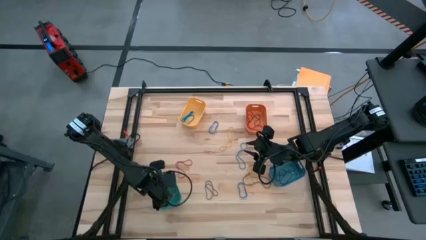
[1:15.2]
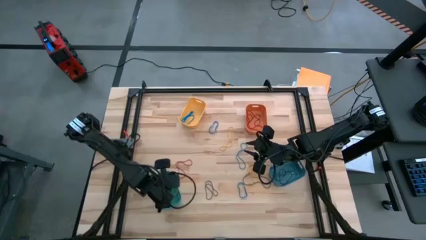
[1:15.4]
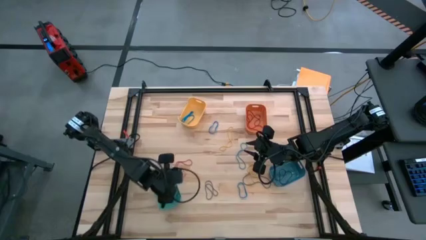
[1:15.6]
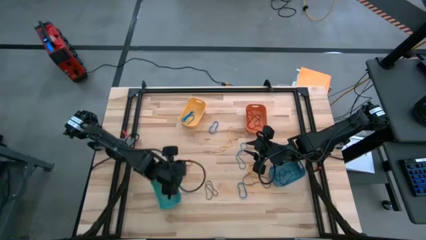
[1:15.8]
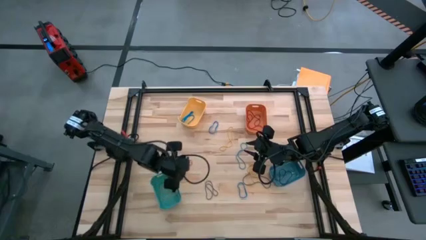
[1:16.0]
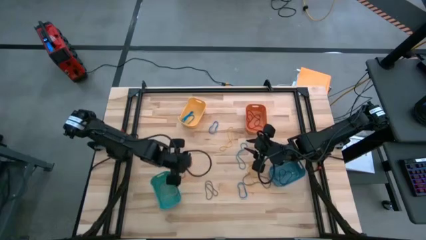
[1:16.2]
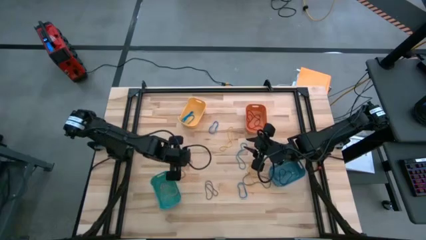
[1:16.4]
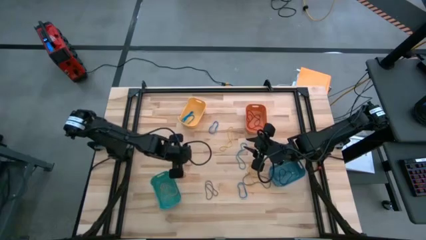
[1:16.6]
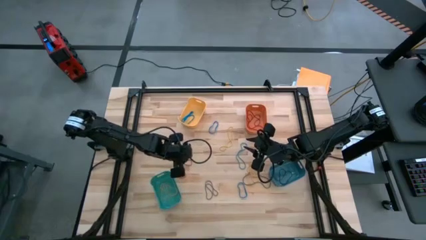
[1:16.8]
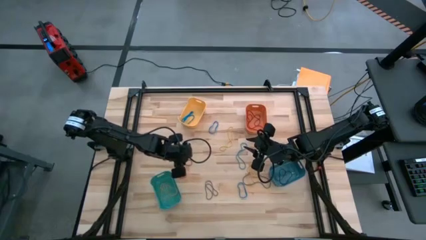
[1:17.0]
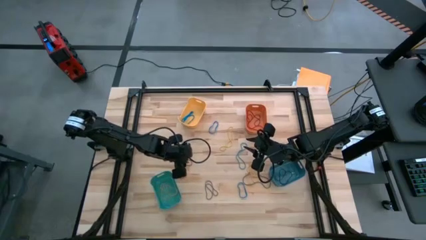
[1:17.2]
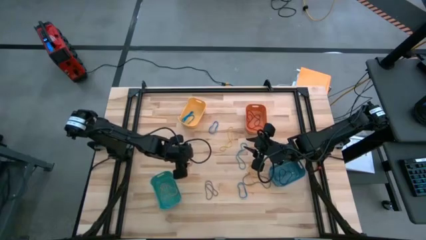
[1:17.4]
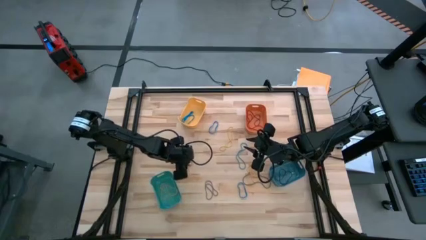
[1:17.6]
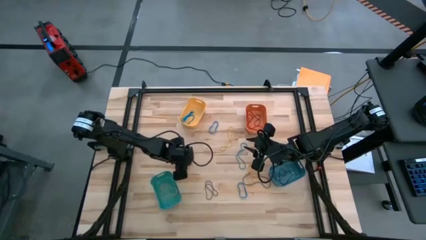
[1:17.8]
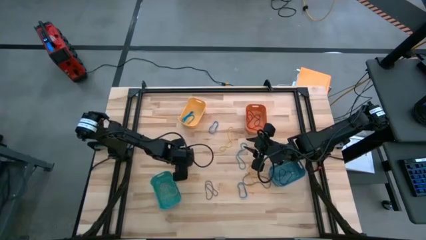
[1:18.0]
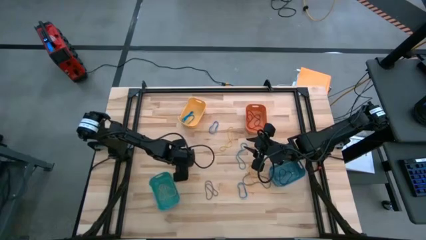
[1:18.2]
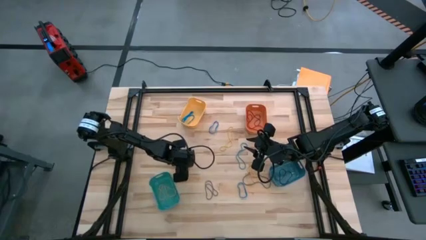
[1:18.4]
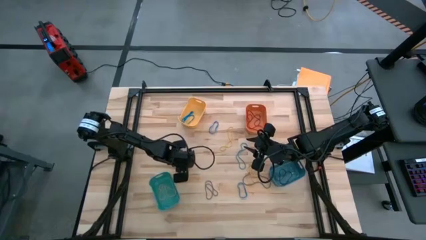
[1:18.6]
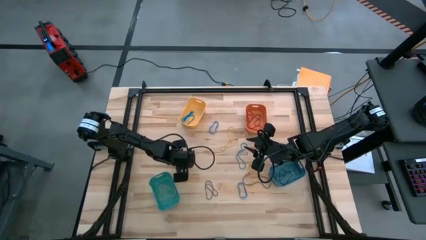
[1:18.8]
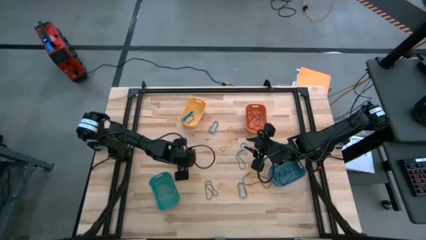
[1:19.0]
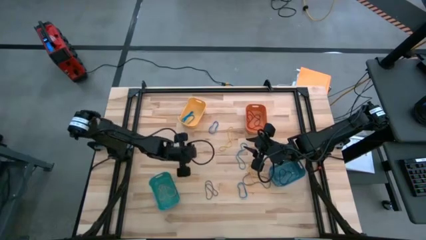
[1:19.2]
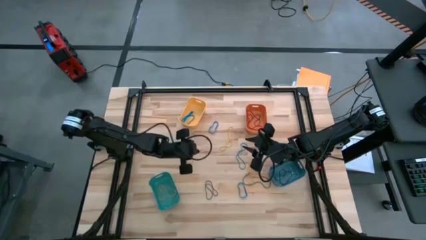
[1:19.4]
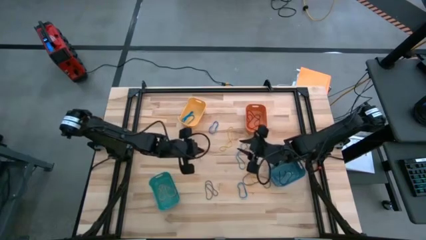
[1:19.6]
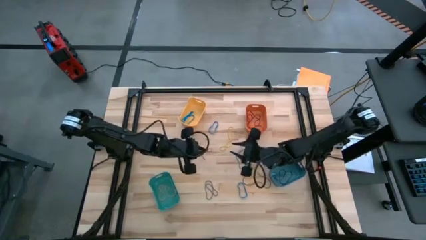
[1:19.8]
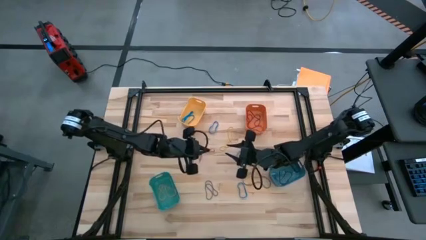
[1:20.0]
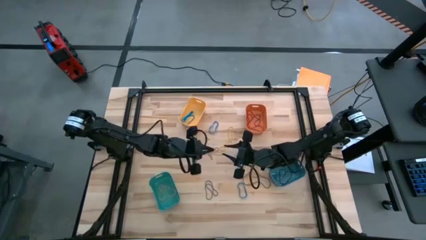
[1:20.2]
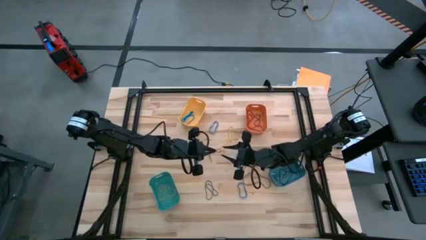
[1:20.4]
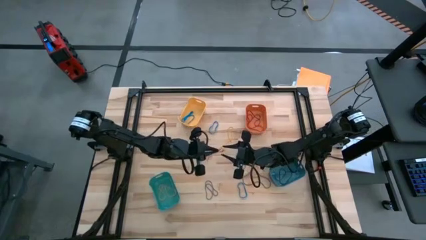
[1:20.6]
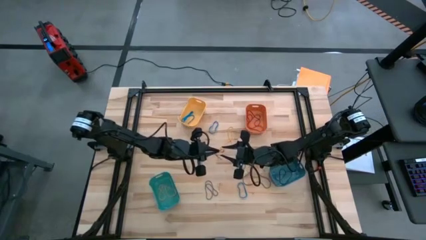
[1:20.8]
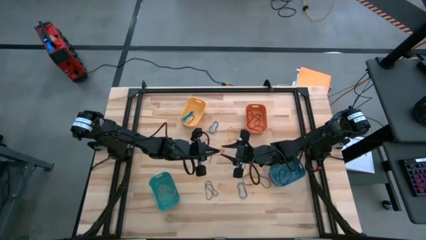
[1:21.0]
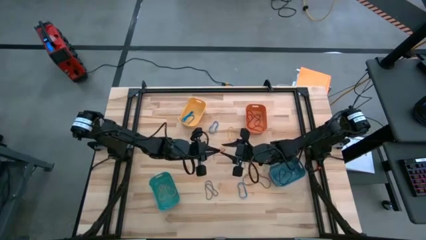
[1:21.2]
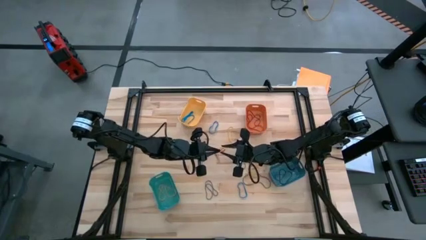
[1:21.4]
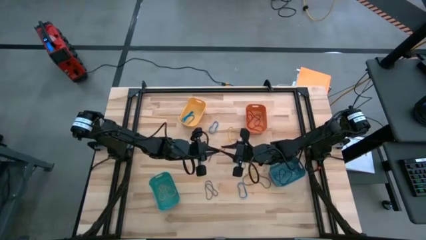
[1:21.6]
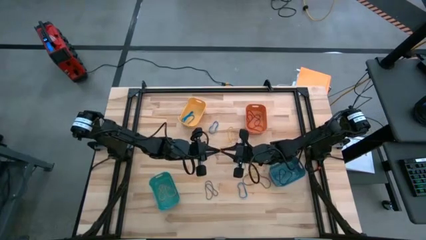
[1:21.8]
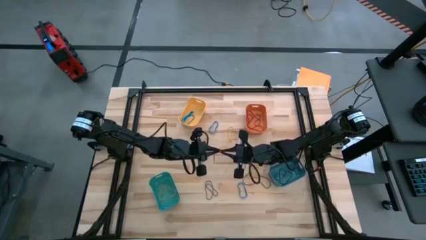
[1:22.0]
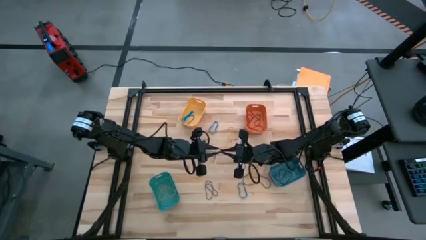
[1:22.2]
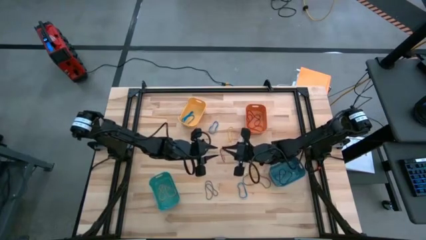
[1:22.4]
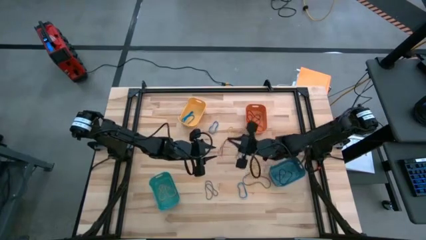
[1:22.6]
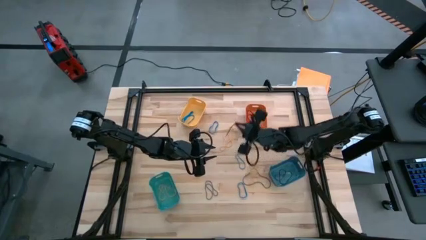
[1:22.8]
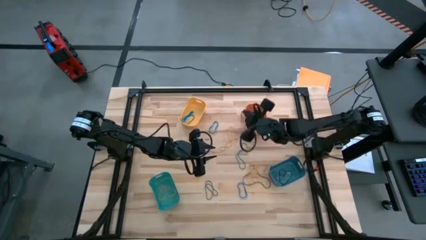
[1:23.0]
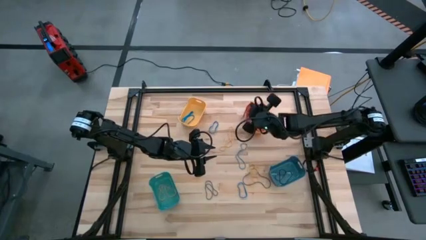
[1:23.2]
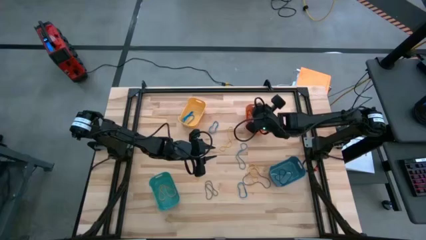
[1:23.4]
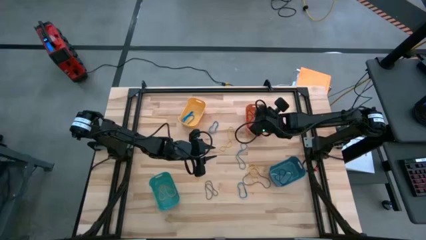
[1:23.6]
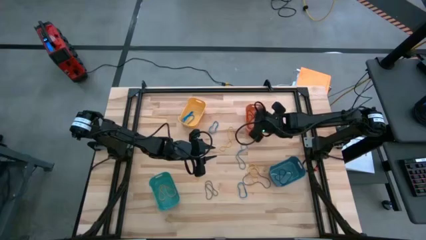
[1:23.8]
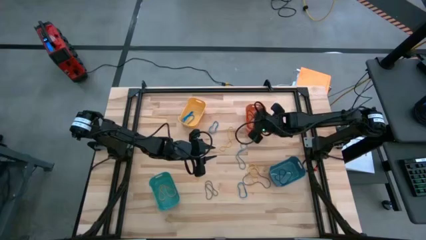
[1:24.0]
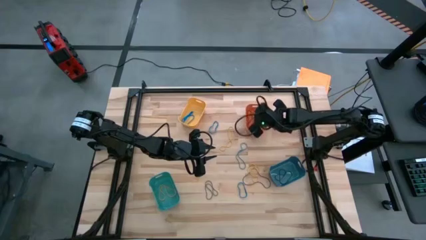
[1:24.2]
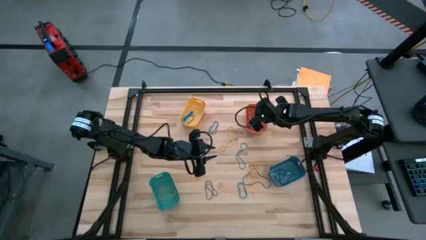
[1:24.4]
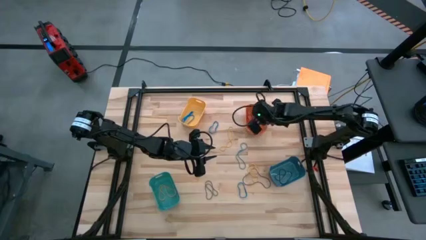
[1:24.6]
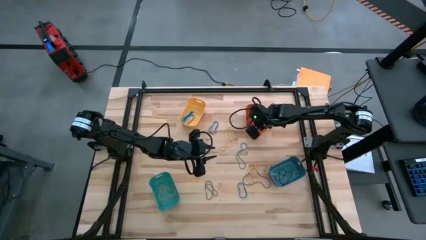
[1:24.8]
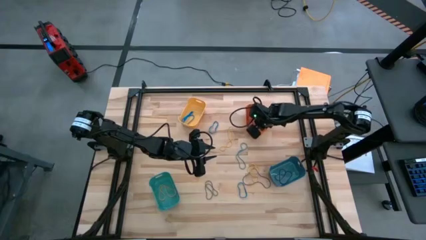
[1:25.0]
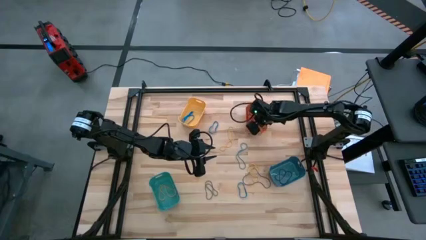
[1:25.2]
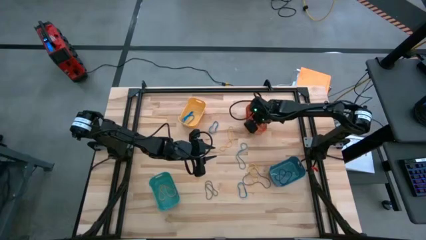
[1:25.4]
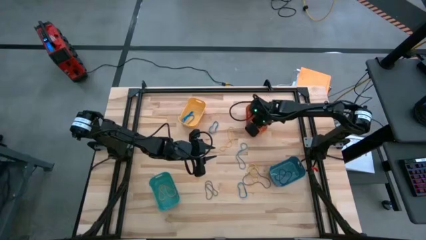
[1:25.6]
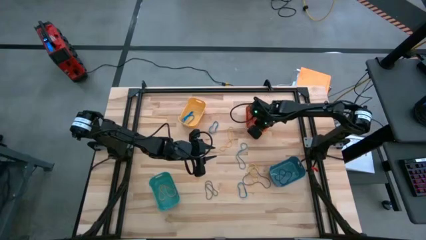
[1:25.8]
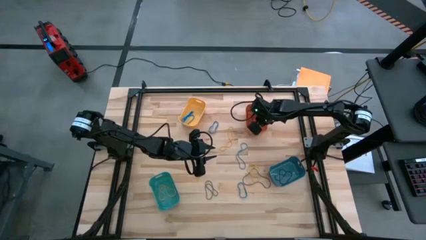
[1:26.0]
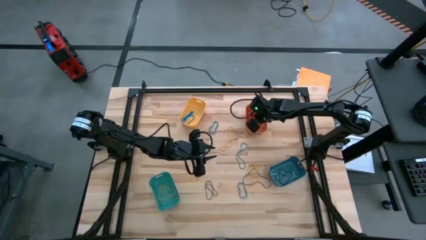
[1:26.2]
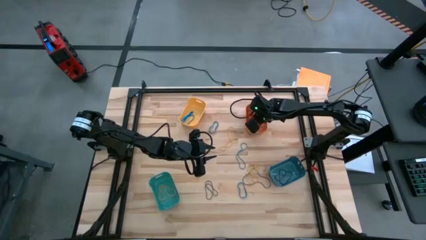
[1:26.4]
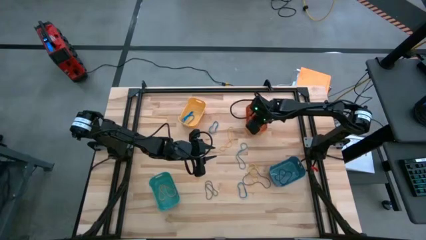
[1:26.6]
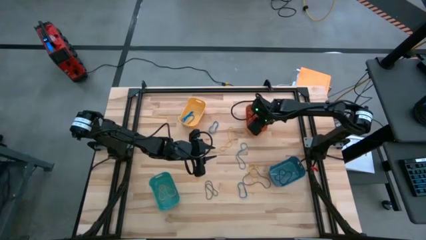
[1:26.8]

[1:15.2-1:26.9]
Task: Sort rubber bands into baskets
Put the red rubber band into the orange bin

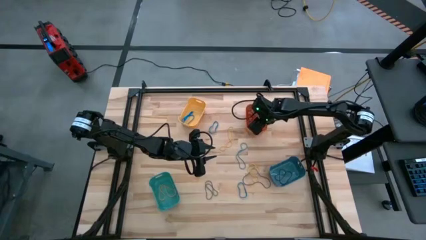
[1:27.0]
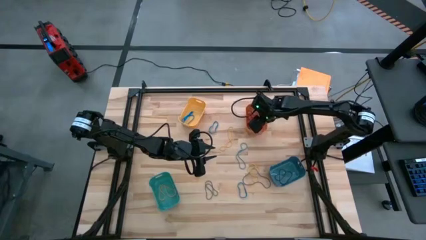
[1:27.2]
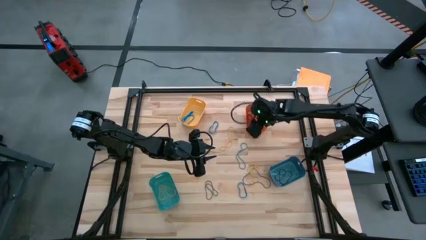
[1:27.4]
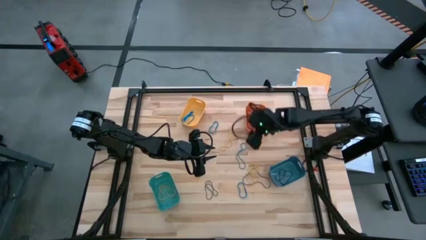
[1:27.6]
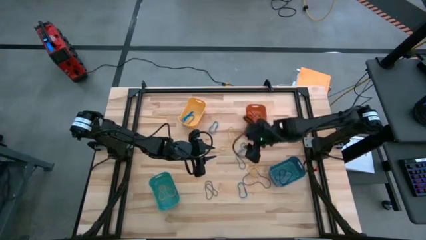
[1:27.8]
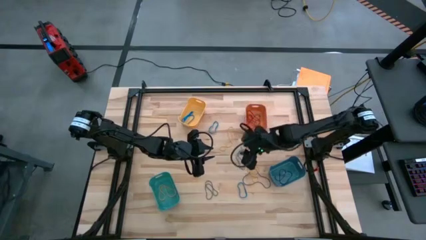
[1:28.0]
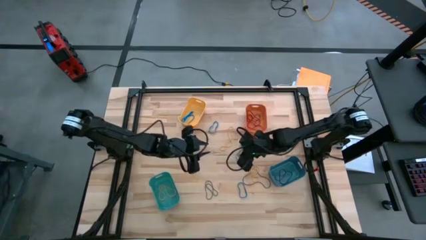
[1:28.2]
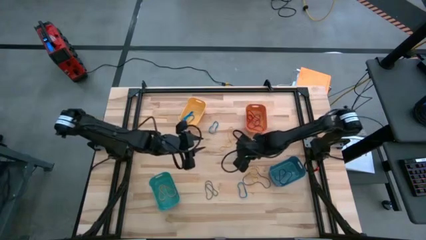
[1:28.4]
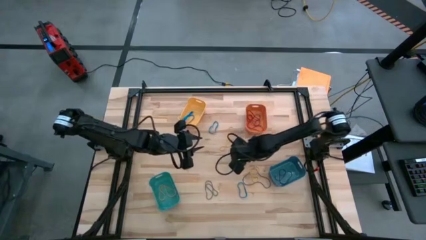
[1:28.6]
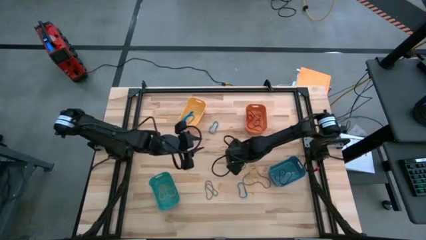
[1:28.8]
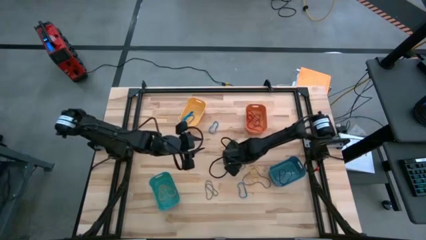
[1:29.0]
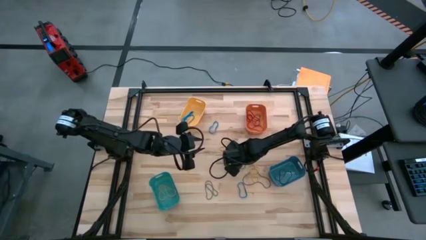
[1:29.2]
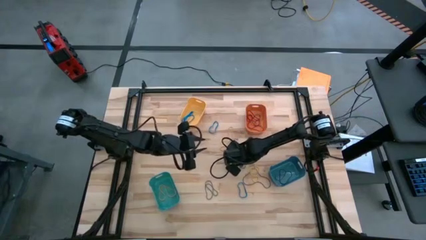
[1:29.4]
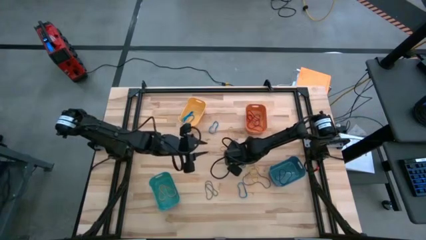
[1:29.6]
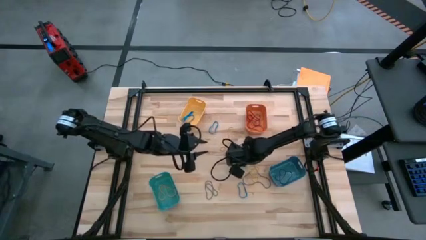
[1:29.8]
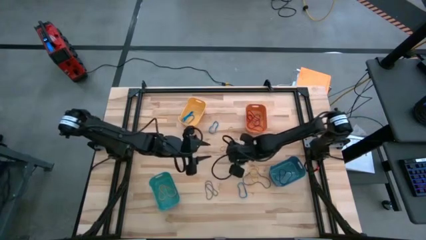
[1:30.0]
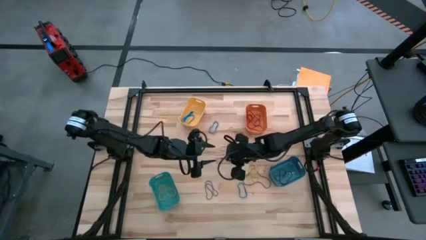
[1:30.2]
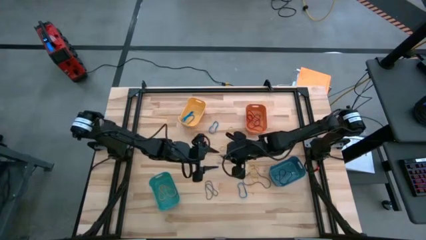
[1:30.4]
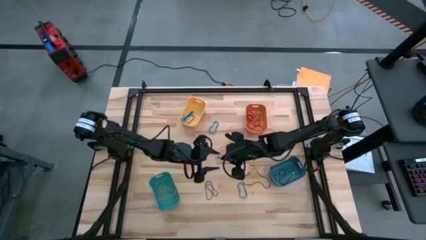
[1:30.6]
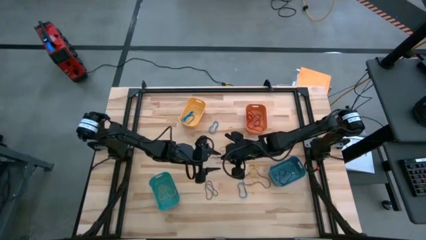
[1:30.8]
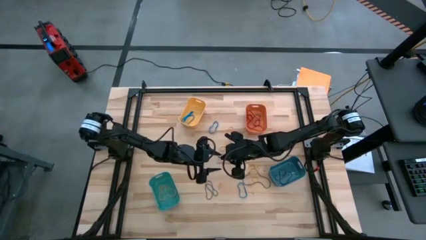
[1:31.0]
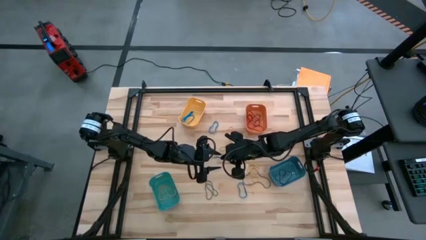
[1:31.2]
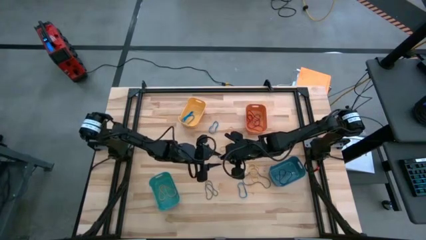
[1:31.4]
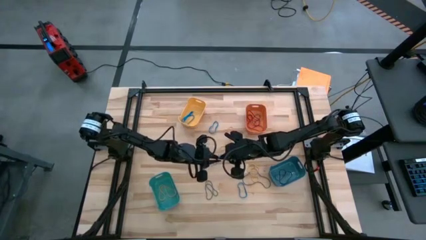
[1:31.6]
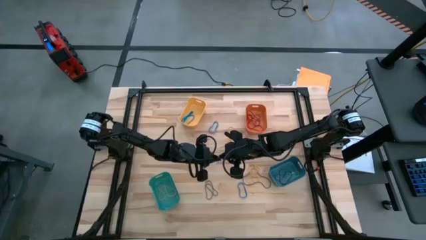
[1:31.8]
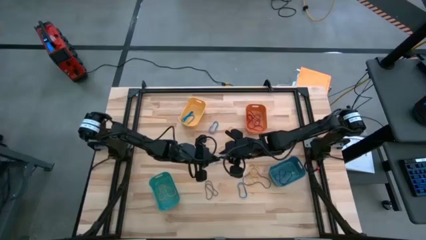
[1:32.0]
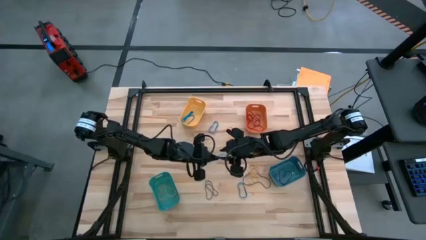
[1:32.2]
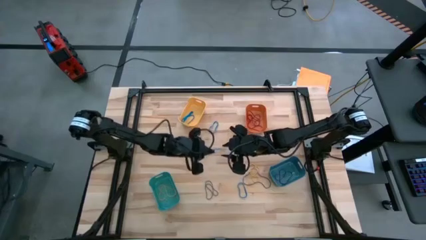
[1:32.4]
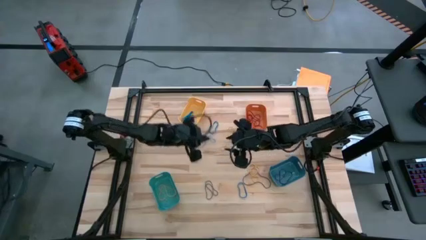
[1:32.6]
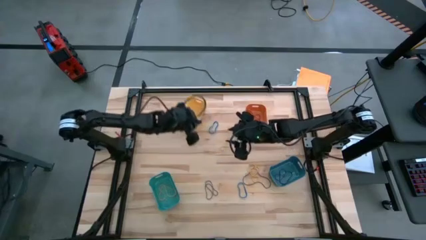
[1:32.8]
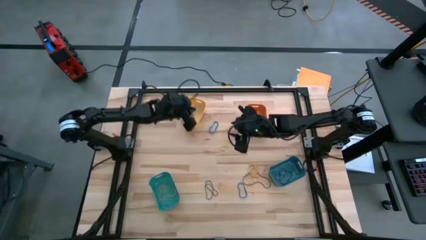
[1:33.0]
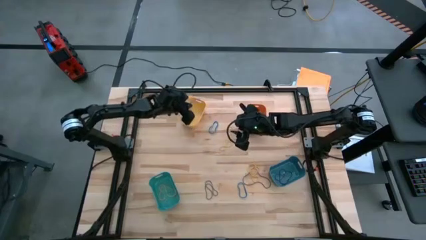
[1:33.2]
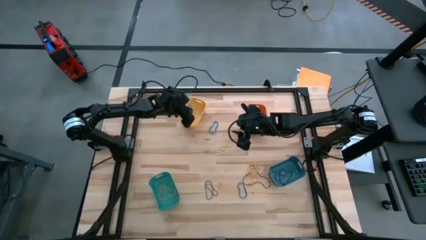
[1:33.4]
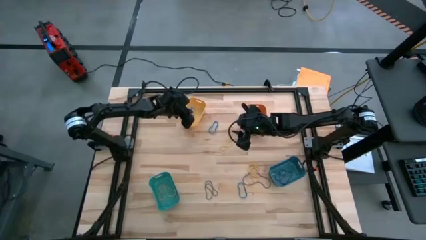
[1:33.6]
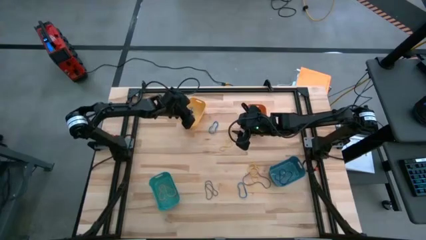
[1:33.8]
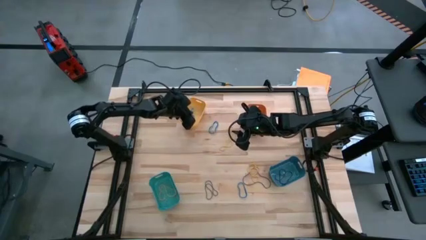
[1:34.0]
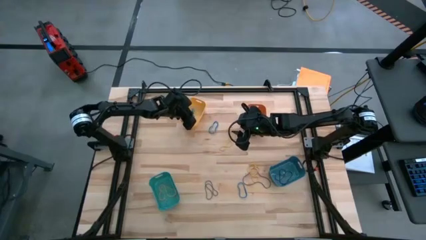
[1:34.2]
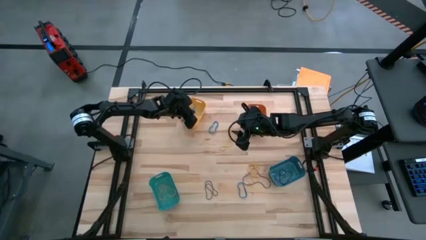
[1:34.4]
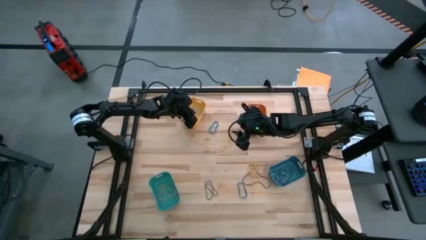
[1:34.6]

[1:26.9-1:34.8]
Put the blue rubber band into the yellow bin
